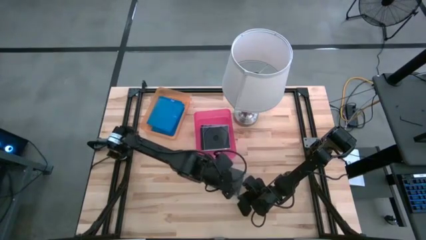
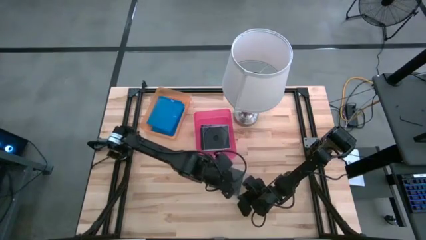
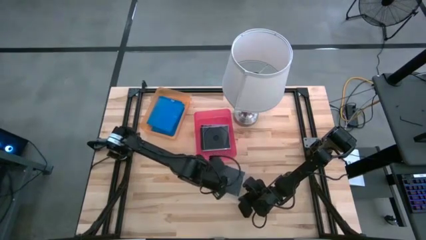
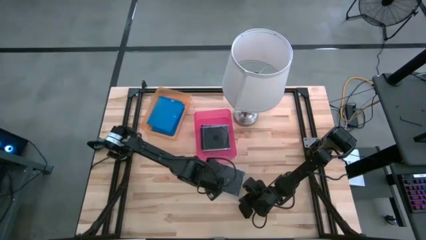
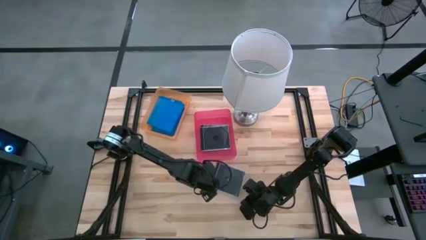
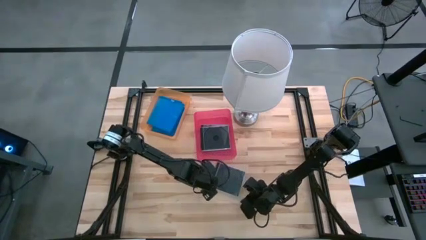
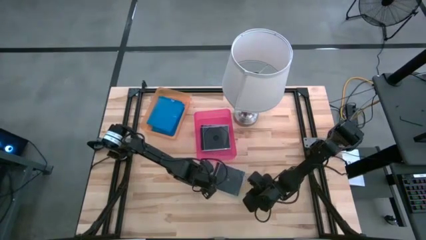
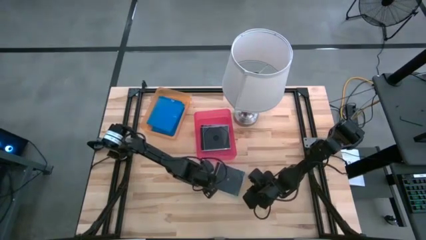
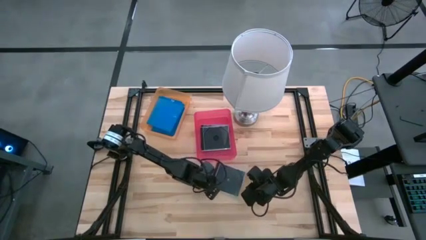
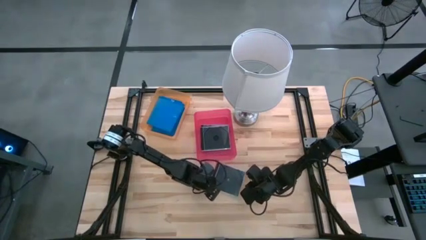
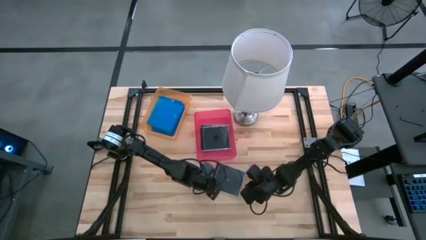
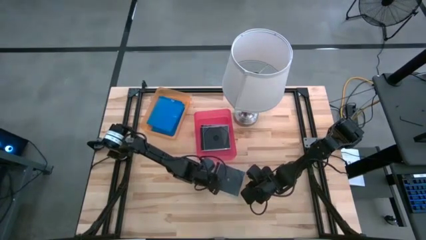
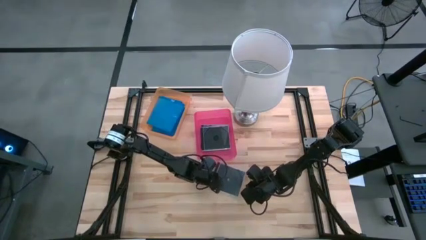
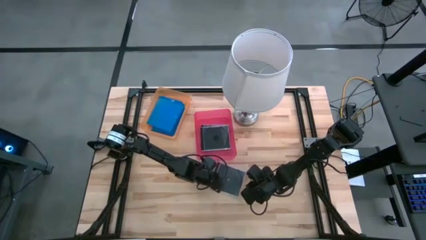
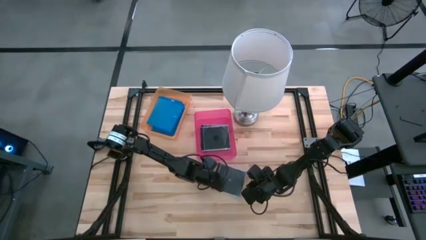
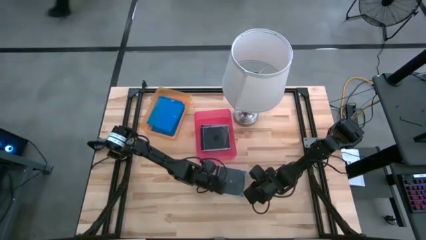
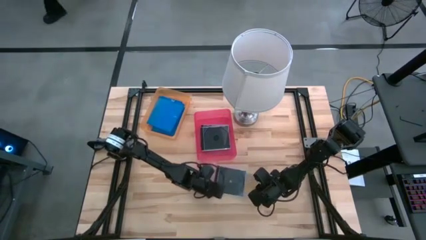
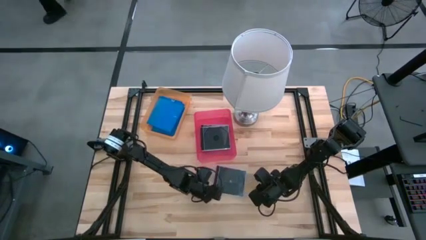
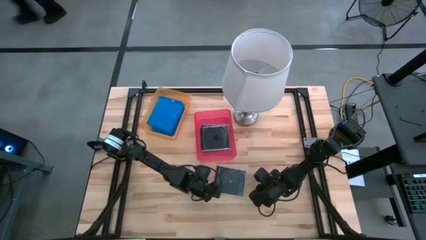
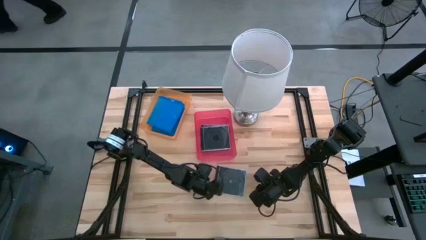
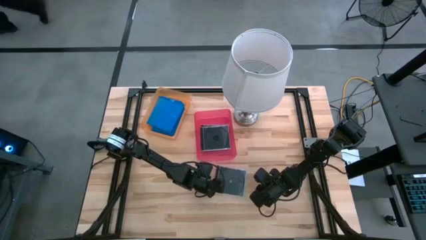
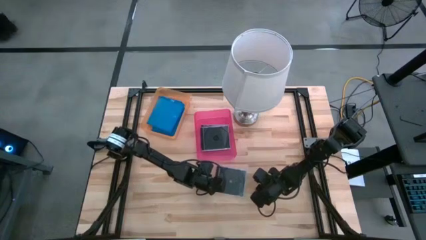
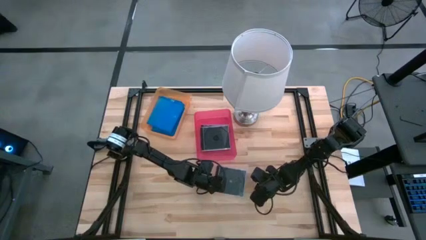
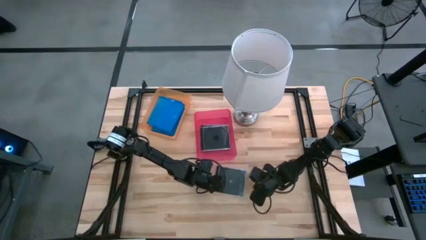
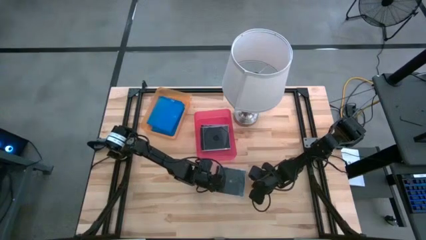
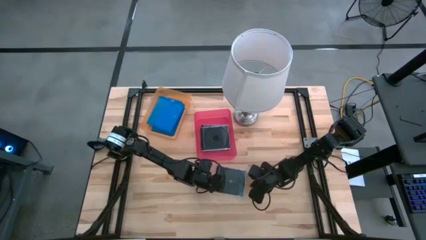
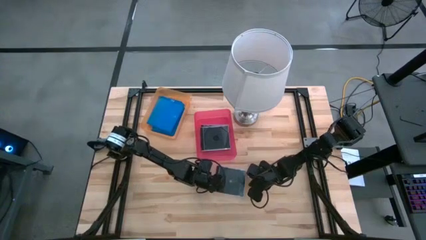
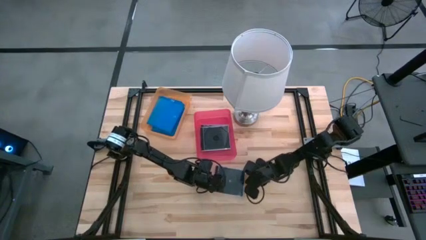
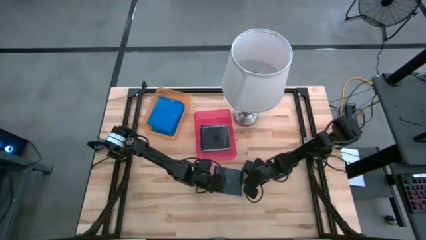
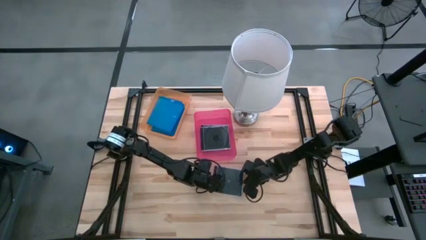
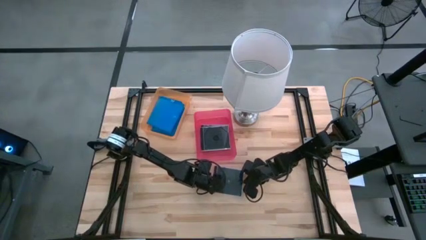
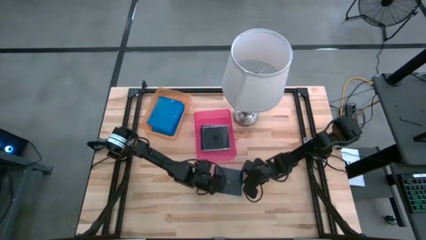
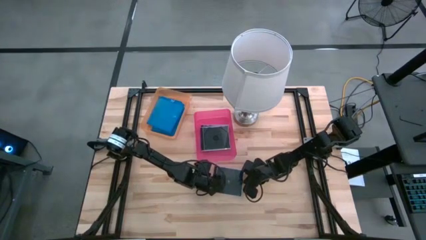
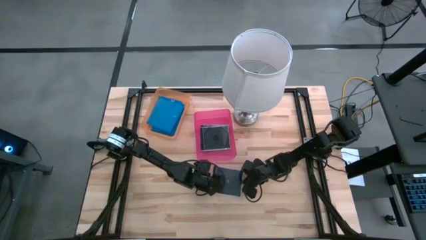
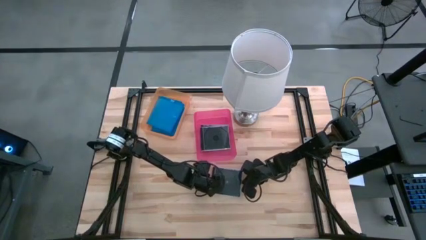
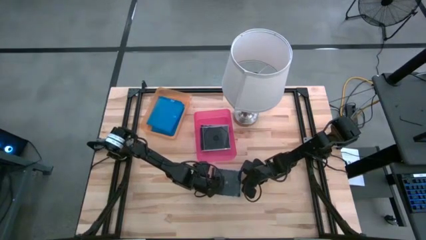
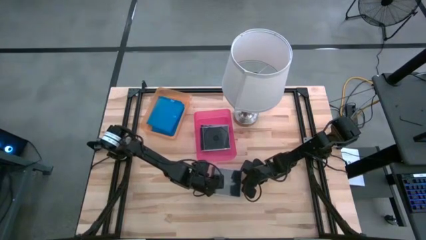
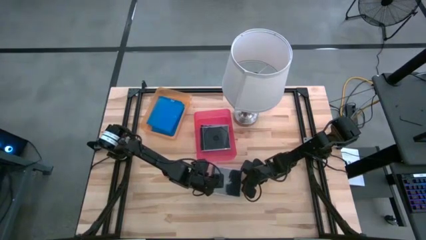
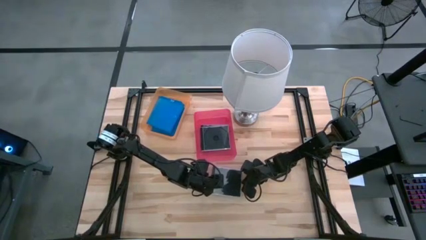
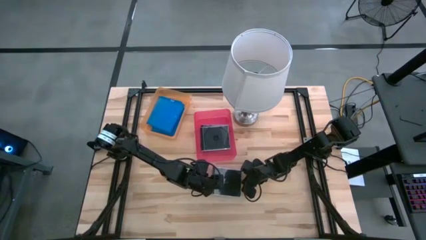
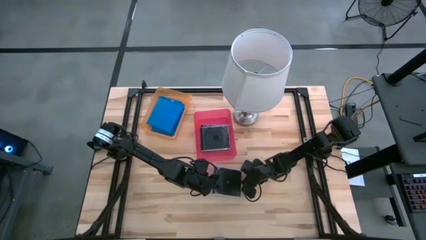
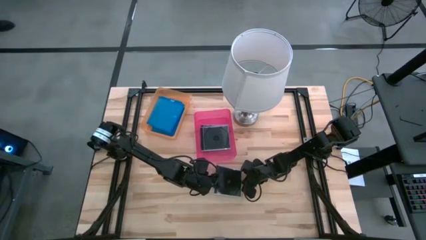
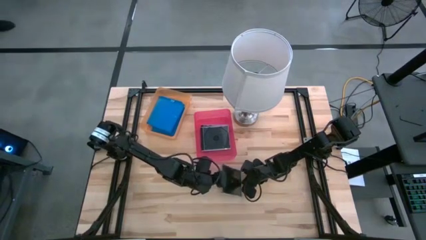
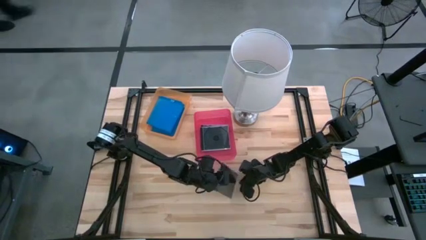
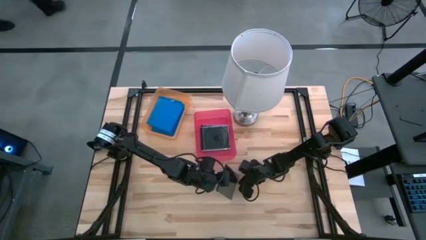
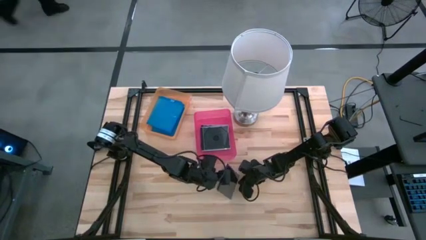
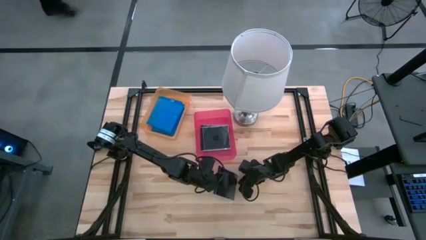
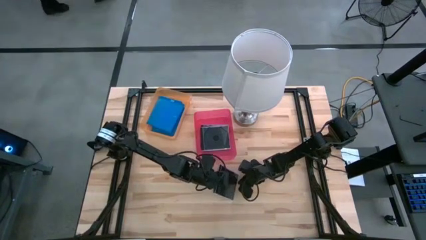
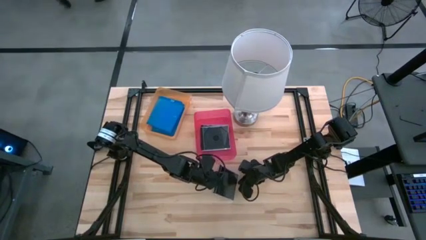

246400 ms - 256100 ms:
Task: Pick & place jewel cases by type
Put the black cd case into the pink bin

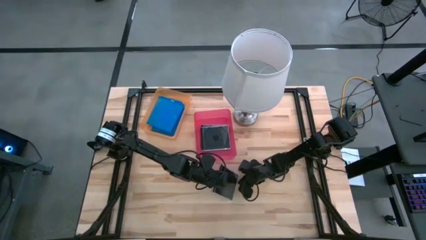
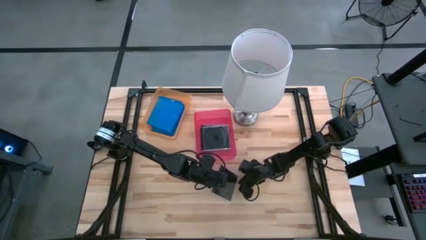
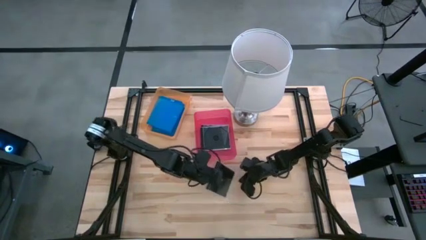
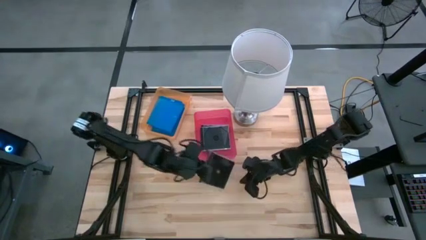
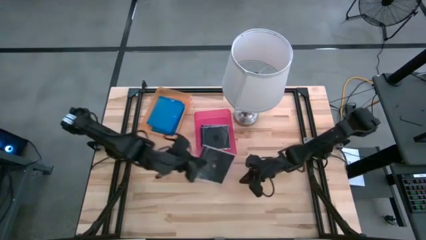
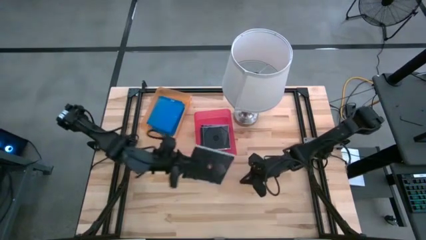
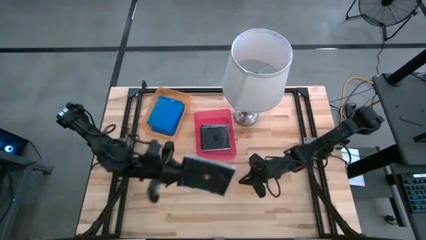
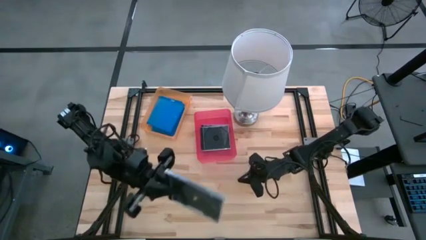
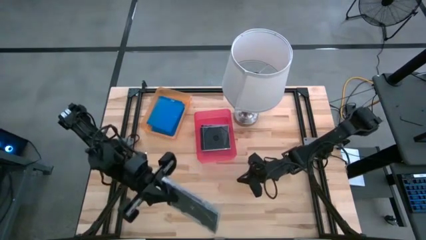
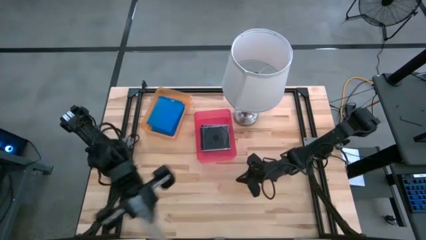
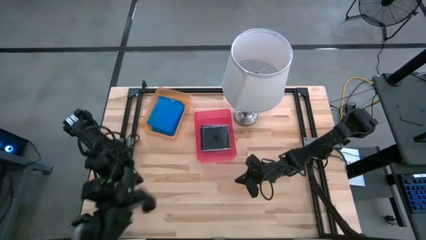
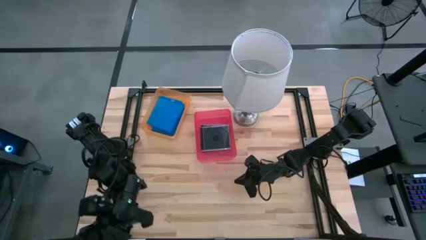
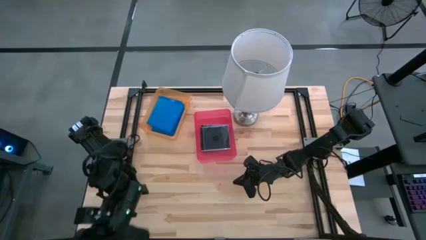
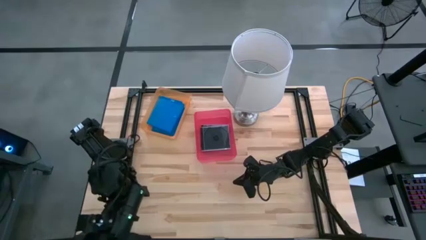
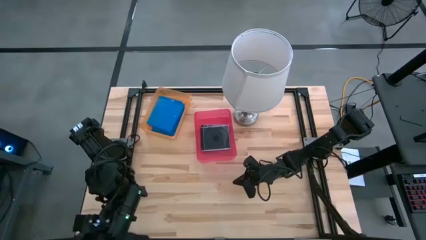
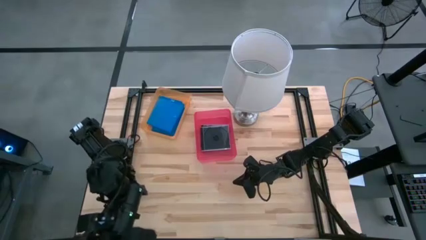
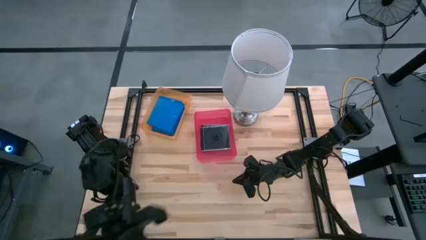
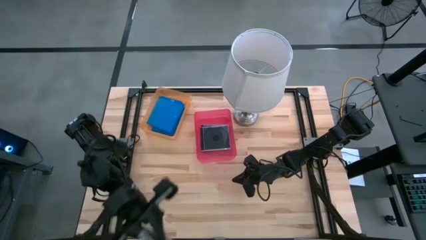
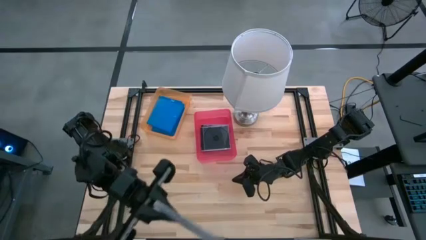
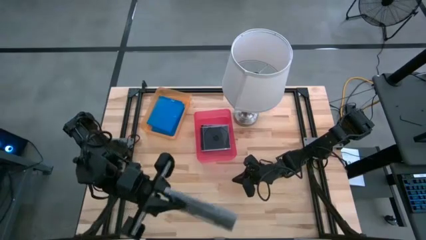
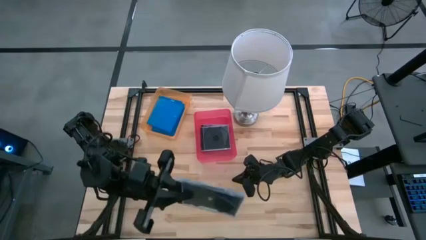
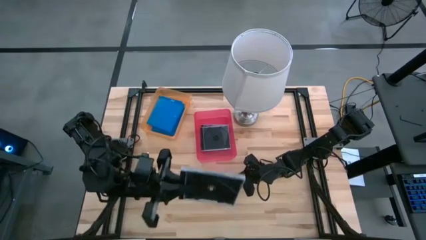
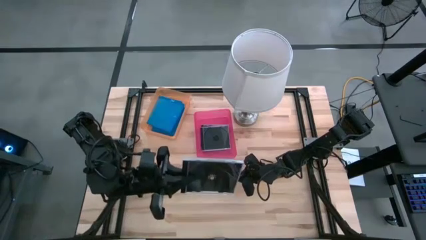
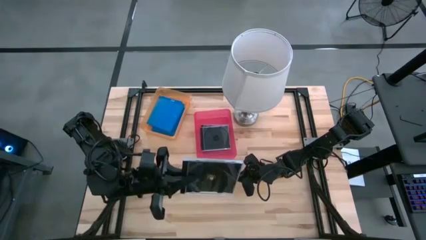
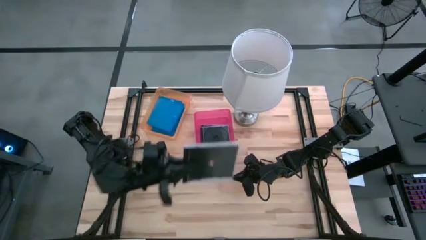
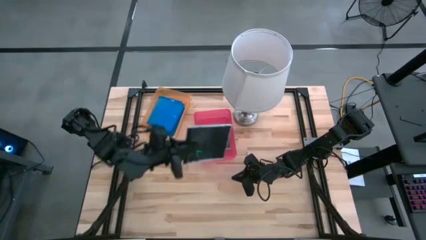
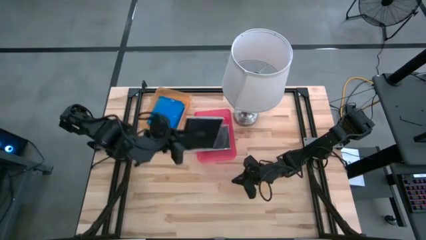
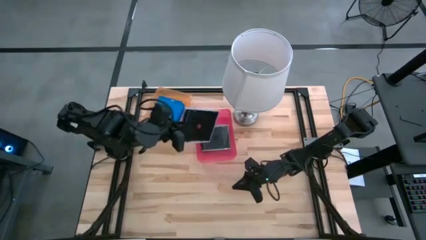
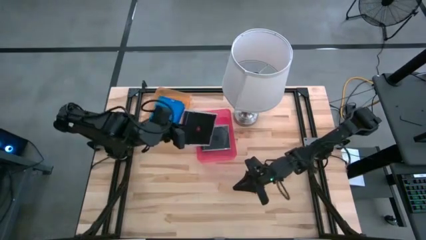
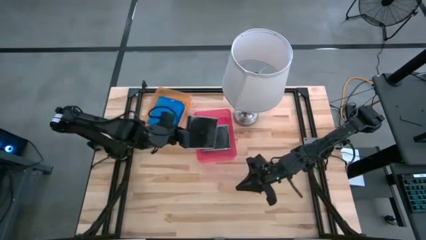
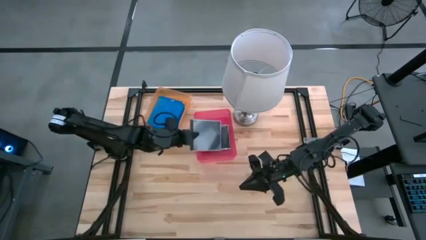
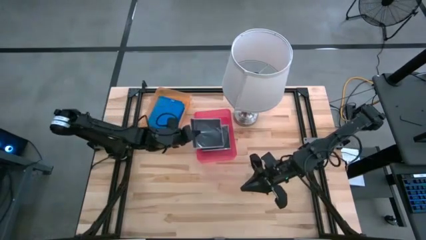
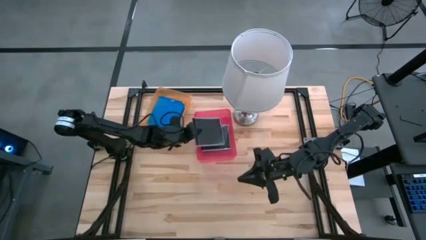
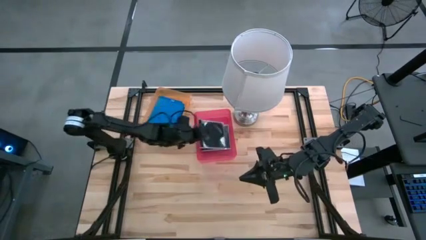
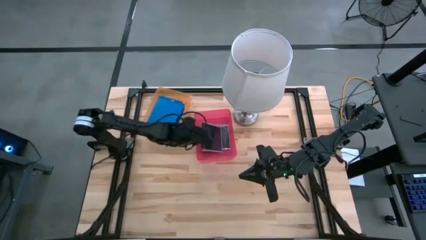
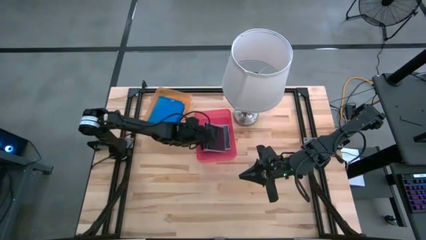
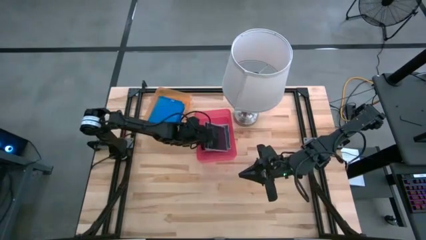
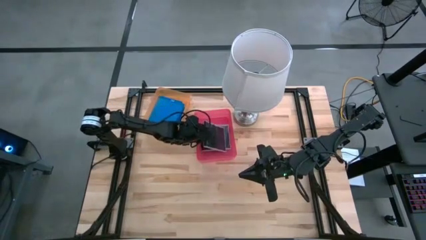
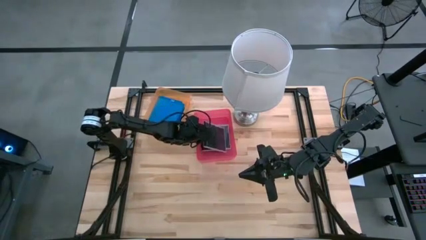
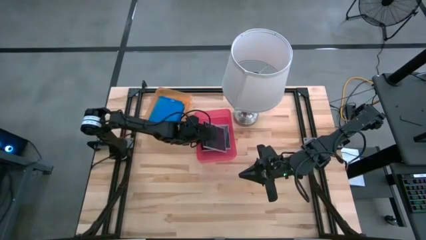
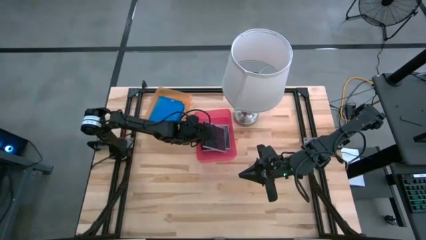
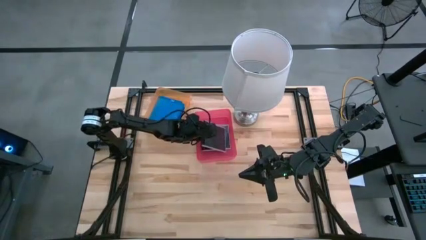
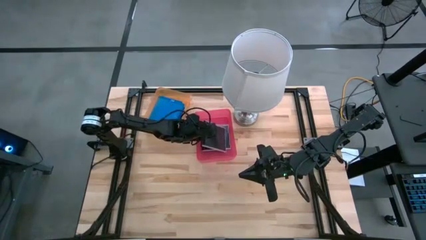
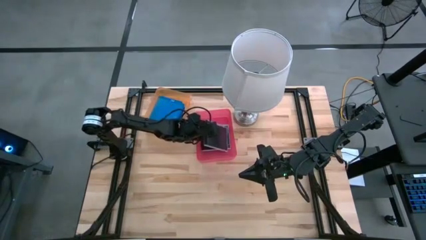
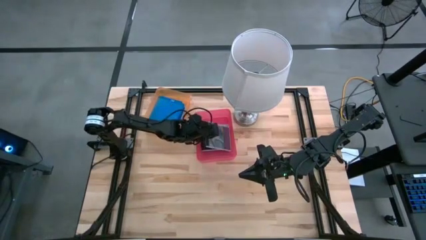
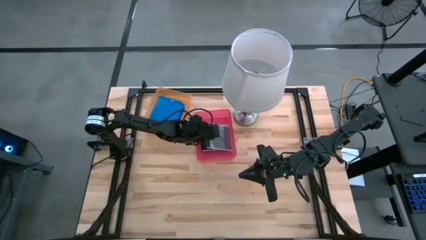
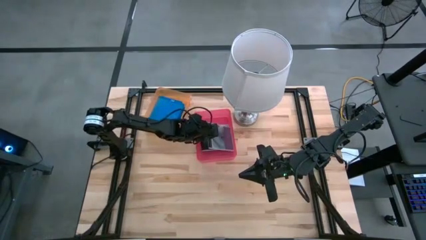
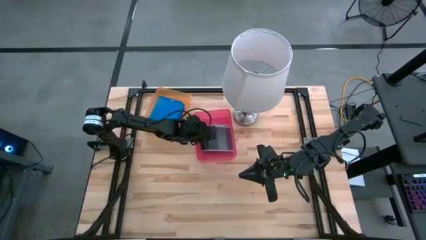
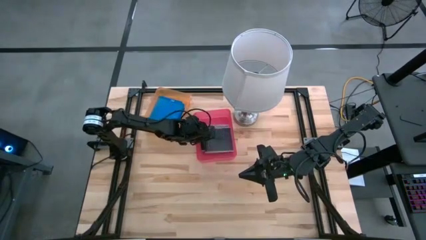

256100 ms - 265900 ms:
Put the black cd case into the pink bin
